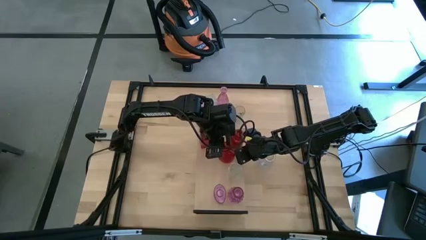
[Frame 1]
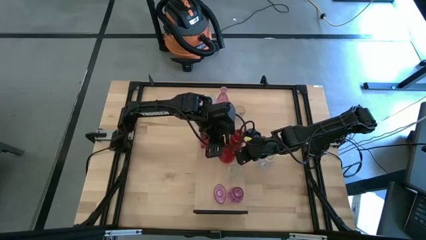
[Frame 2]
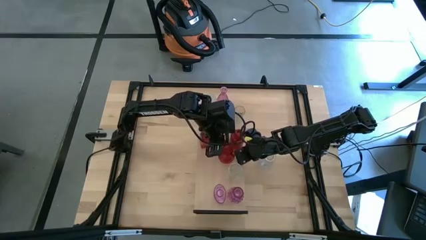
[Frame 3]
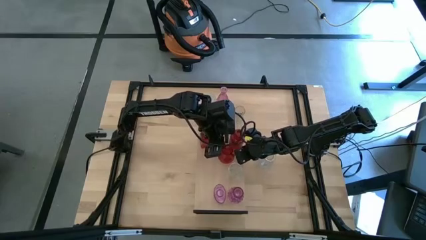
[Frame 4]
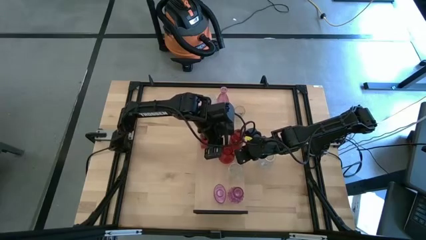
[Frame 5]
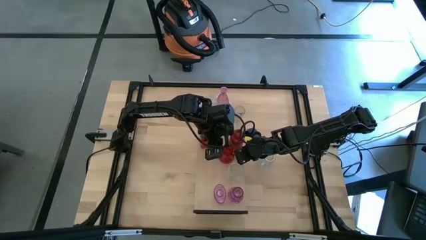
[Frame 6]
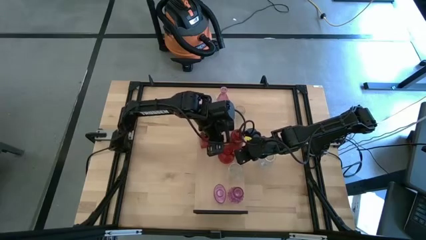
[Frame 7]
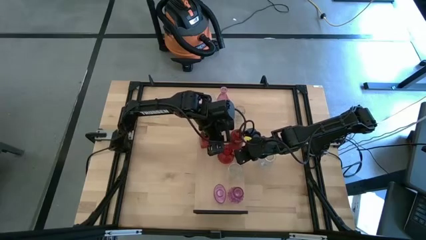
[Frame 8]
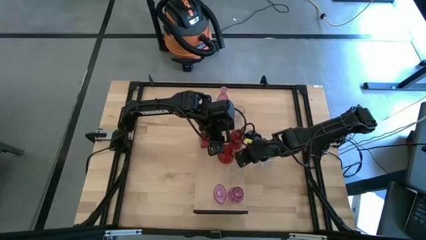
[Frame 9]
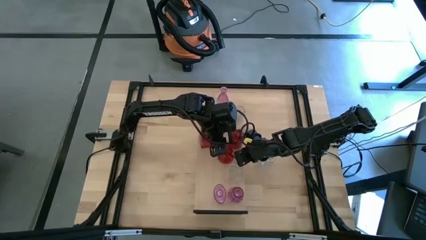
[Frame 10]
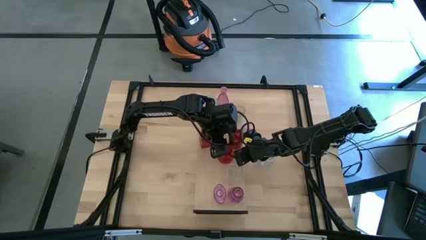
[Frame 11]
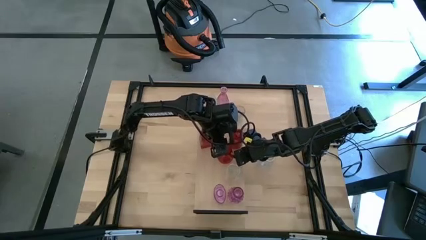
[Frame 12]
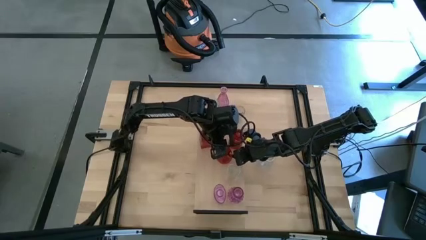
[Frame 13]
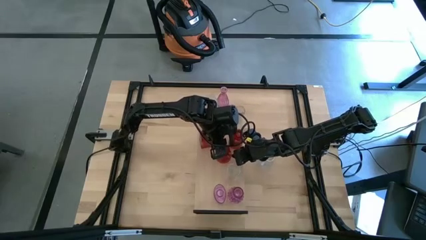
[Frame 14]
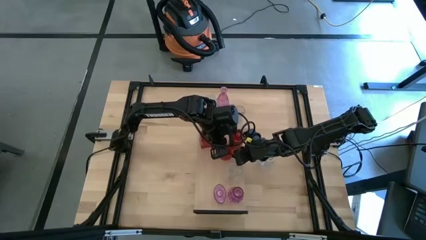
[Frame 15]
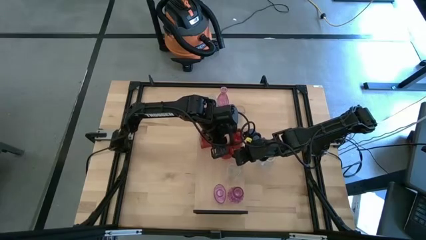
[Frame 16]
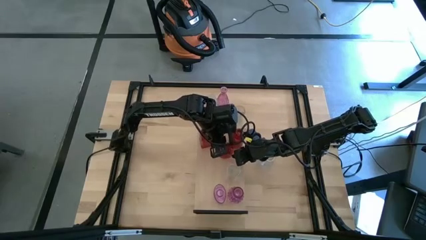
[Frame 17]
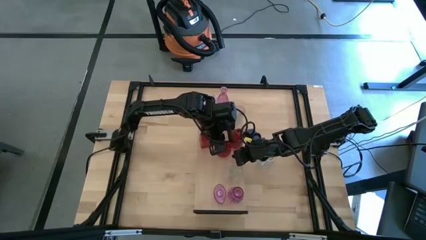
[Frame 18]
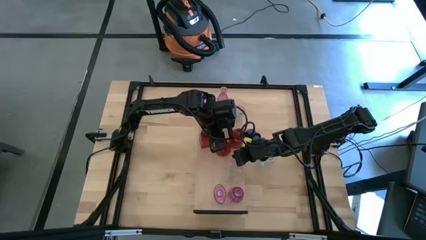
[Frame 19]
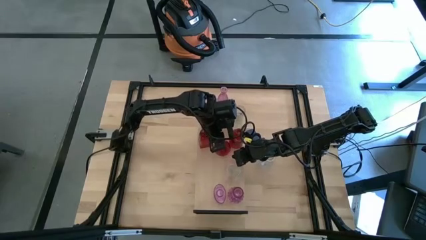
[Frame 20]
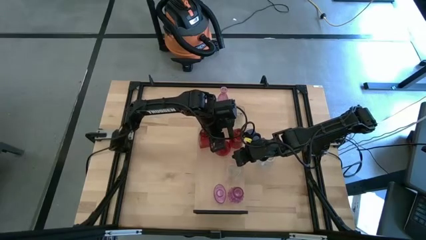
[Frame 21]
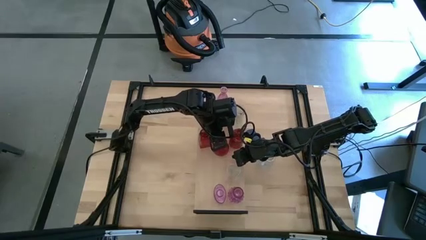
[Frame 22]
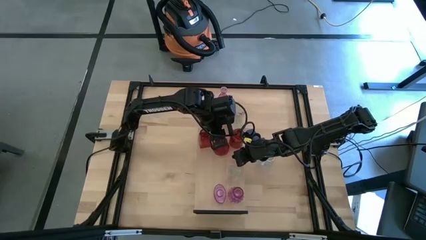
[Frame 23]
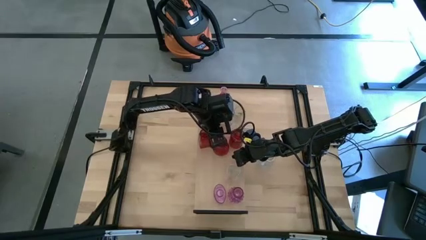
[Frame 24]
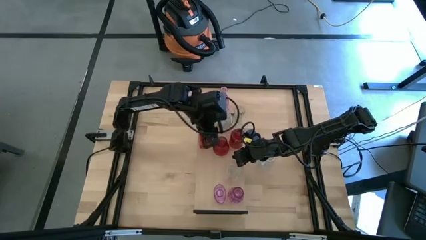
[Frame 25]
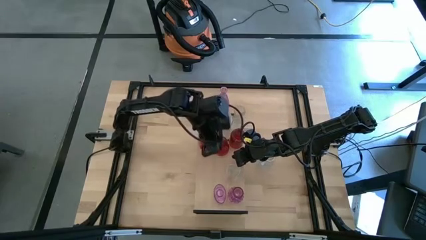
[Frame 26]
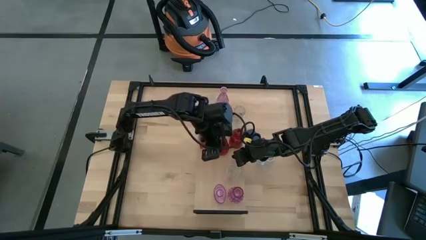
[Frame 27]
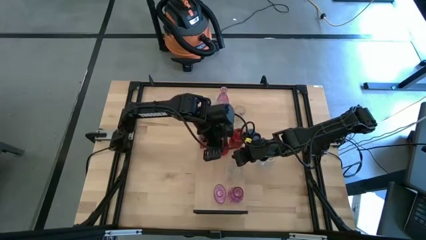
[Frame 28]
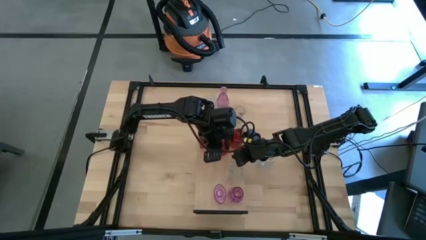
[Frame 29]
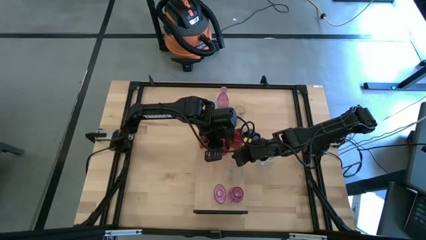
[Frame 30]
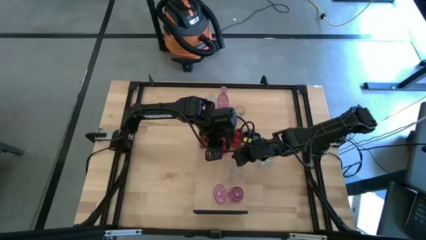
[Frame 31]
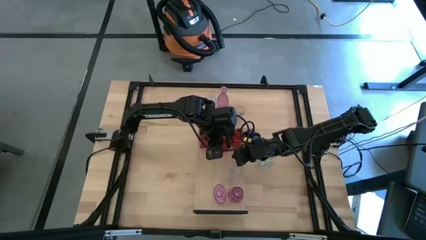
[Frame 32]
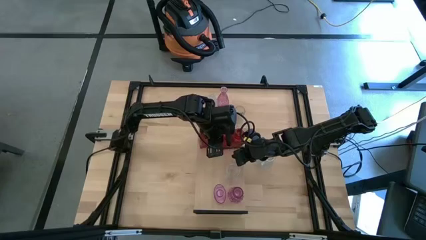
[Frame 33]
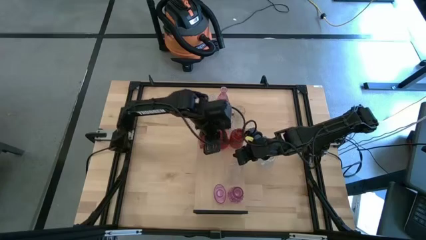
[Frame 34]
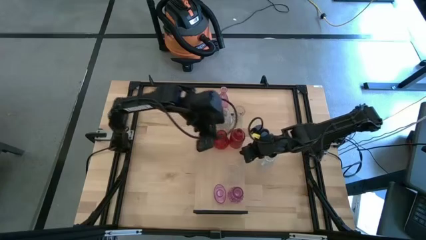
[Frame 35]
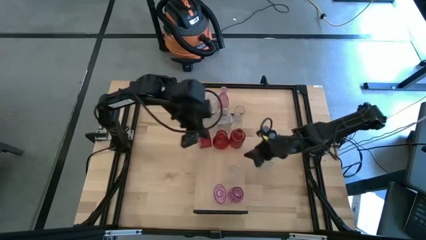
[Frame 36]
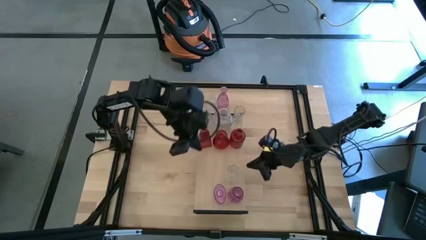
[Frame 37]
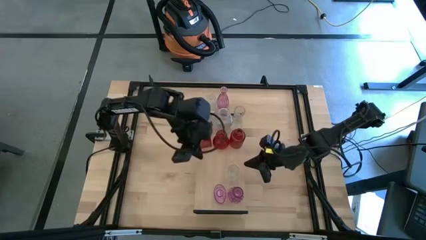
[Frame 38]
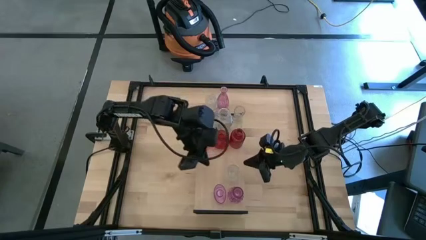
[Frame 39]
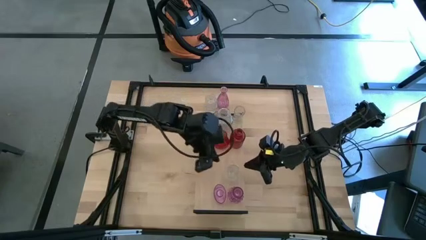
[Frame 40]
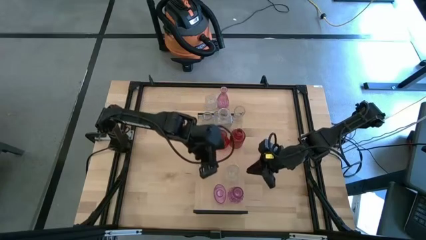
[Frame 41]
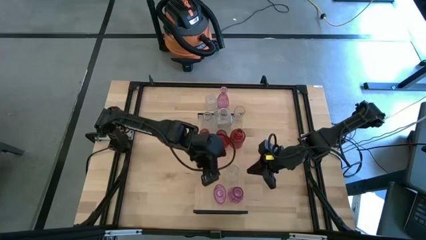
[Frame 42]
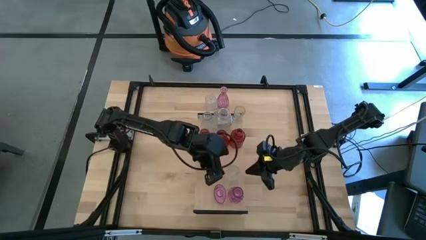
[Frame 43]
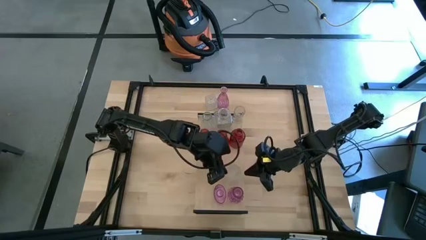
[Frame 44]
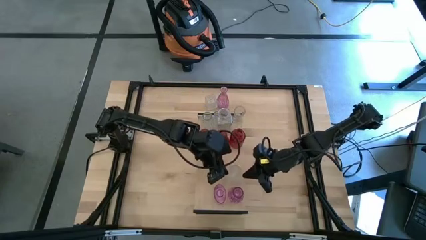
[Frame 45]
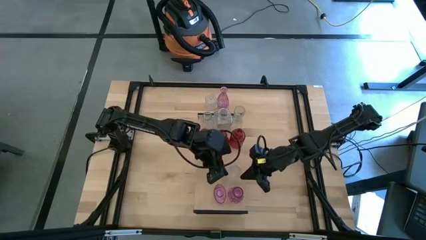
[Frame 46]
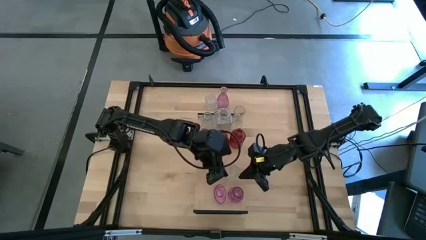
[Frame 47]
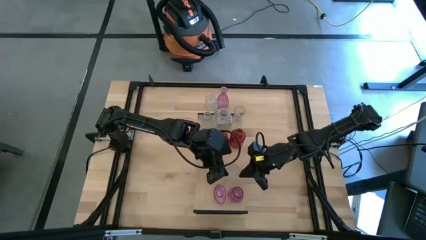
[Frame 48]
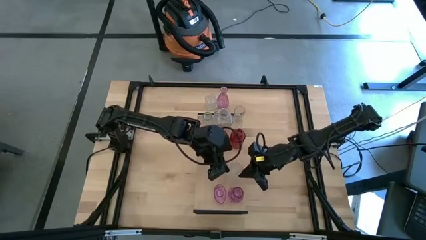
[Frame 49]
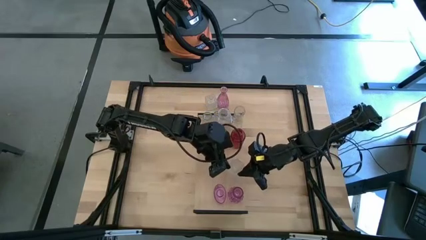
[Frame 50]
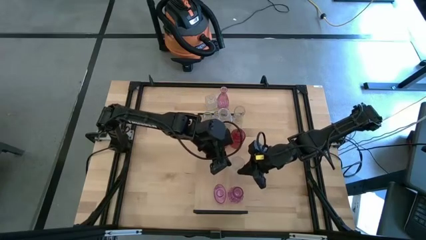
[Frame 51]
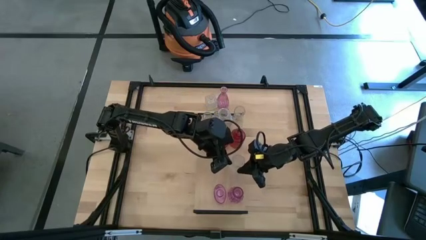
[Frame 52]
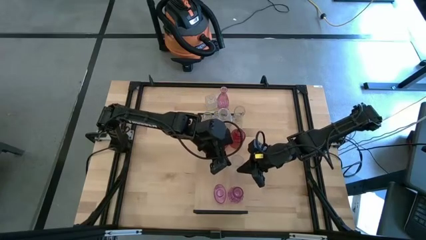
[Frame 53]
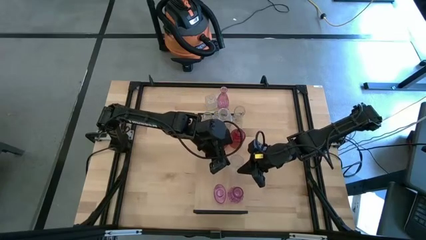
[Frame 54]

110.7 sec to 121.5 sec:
Task: sort vases onto shelf
Adjust the vases on the shelf

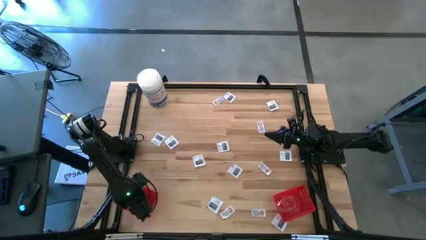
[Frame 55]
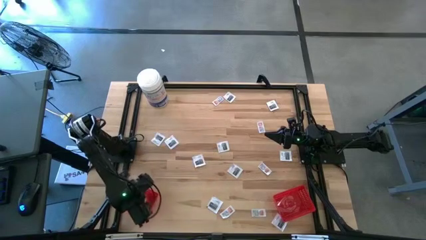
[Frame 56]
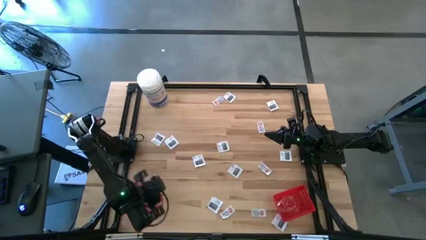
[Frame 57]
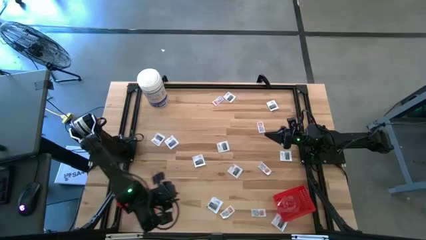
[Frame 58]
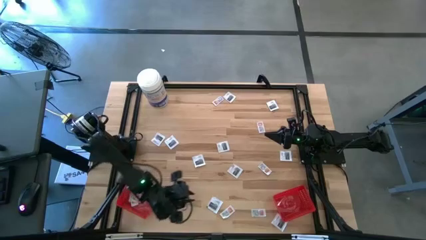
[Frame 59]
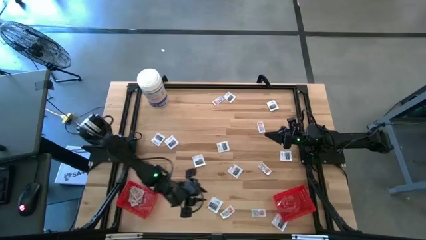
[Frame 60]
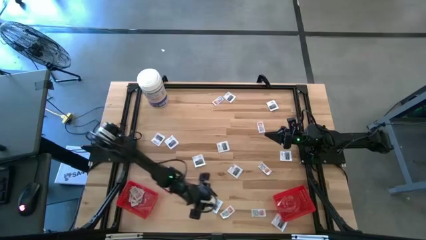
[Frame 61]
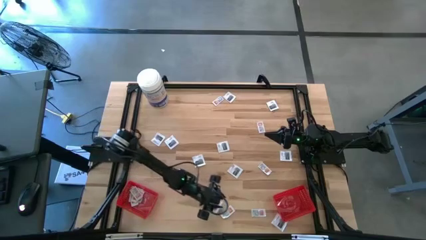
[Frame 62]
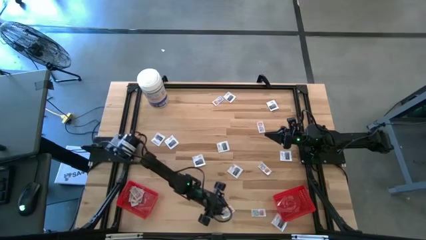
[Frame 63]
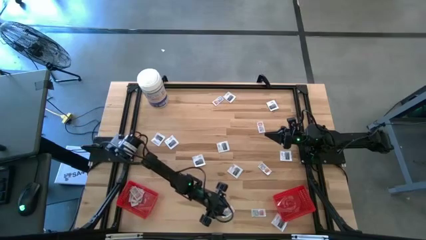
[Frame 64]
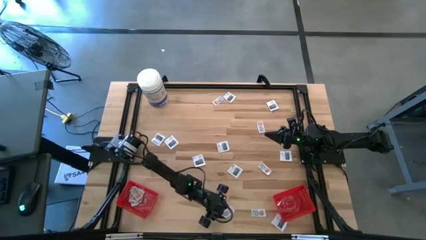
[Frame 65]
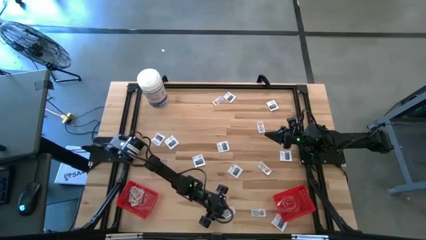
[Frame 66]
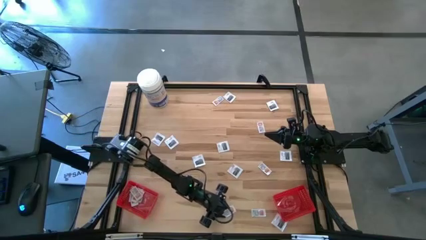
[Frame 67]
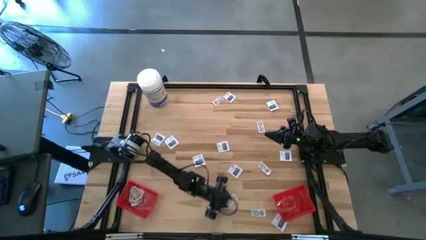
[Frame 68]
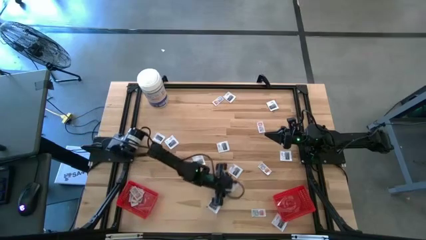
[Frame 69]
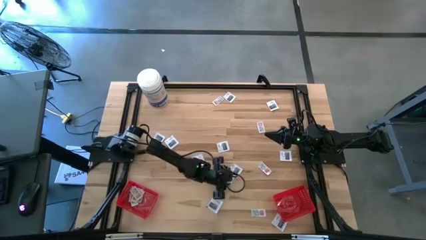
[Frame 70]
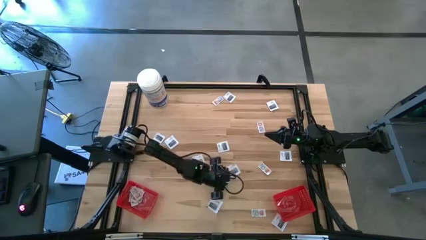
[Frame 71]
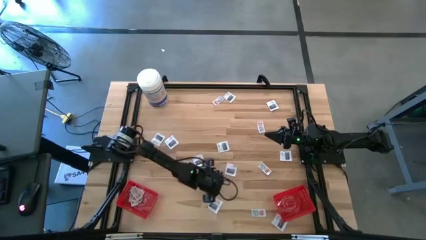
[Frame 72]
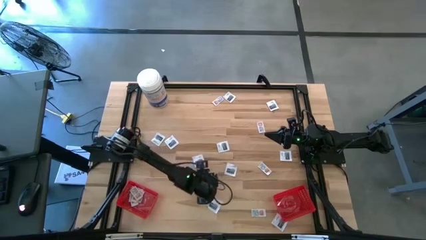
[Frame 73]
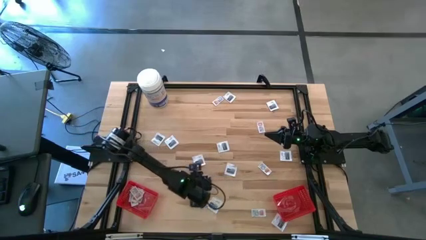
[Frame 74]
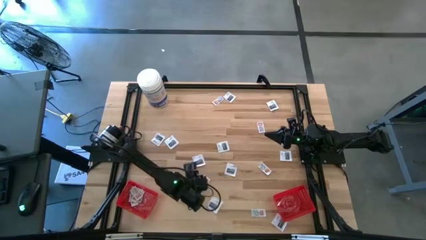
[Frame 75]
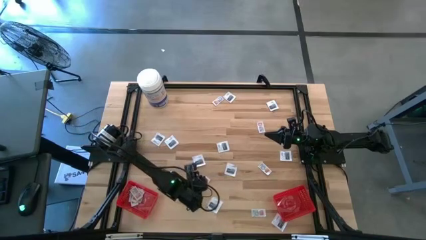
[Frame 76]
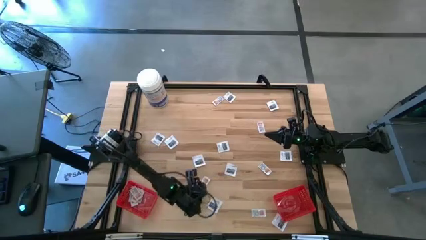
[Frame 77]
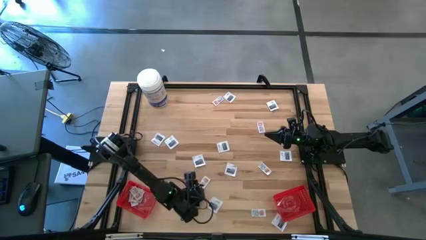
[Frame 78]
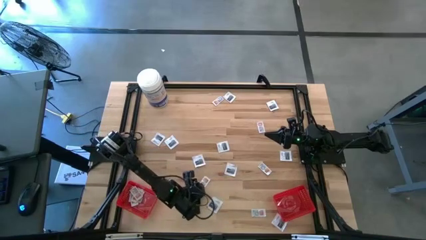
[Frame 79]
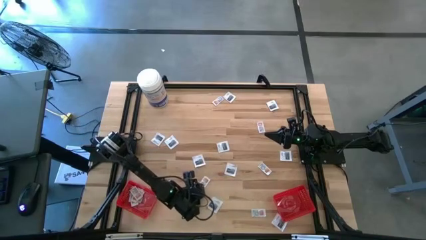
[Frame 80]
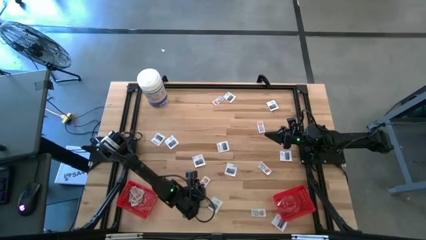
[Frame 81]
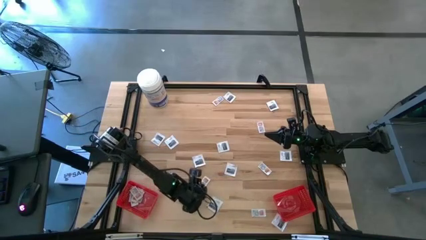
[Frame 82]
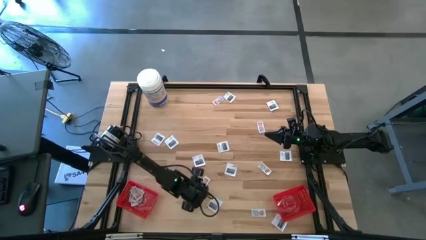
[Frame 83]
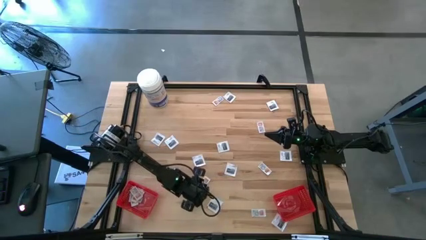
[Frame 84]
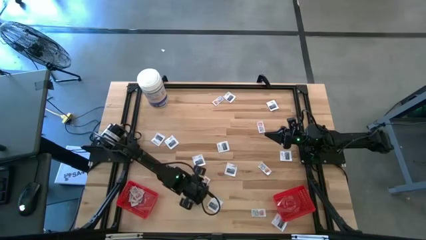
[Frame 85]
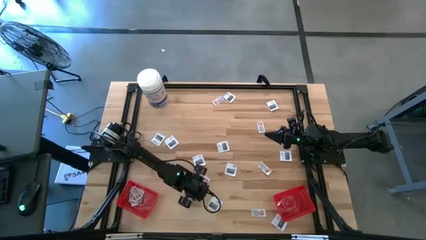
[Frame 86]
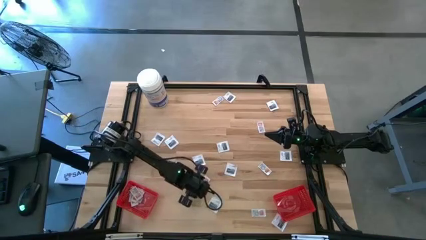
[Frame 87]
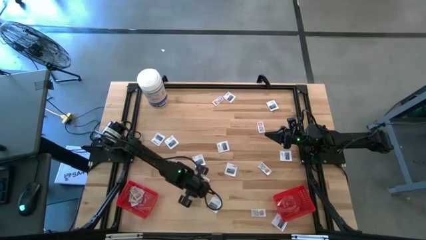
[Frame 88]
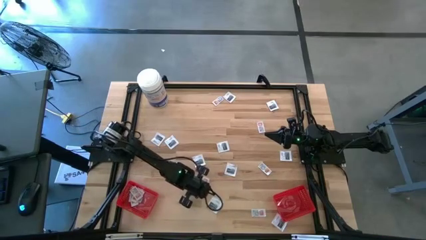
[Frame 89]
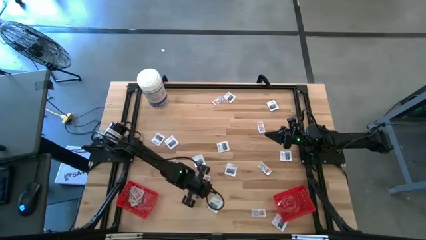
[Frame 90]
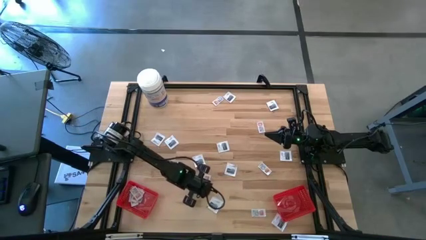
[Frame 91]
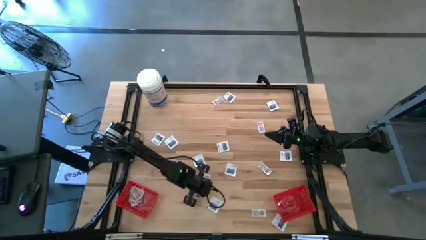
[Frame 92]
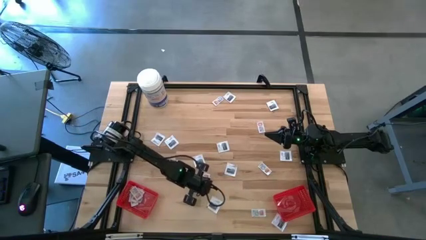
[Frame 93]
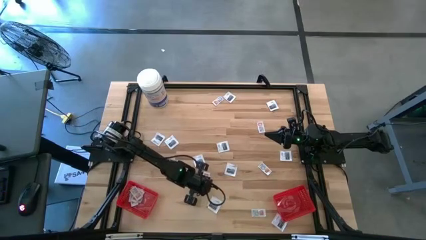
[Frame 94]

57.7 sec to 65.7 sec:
Task: Pick & Place First Aid Supplies
Put the ointment pack into the left red bin
